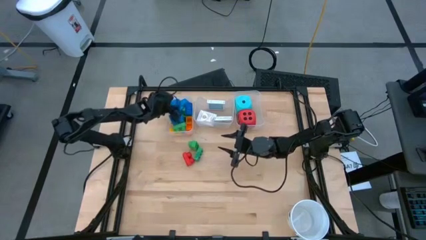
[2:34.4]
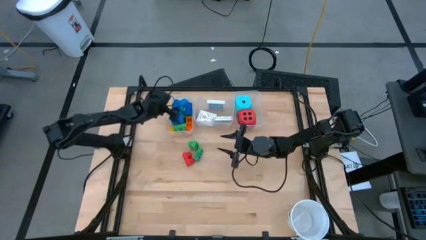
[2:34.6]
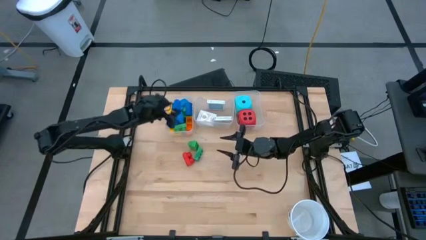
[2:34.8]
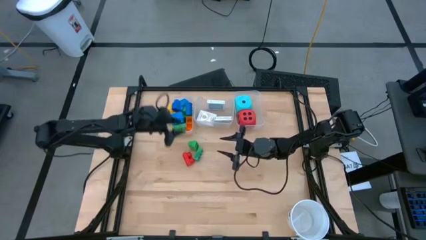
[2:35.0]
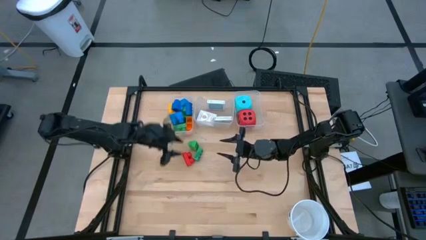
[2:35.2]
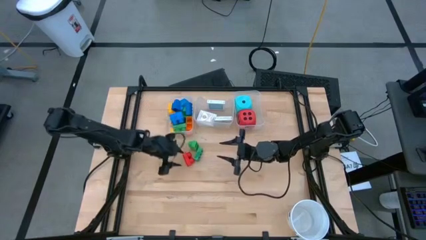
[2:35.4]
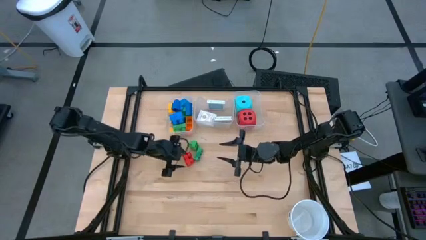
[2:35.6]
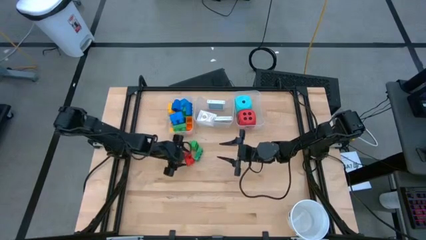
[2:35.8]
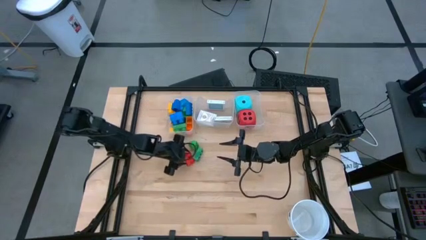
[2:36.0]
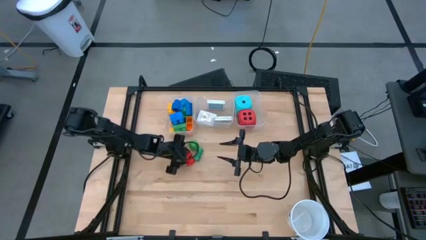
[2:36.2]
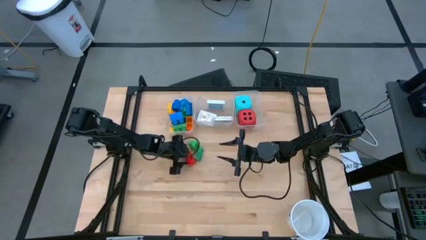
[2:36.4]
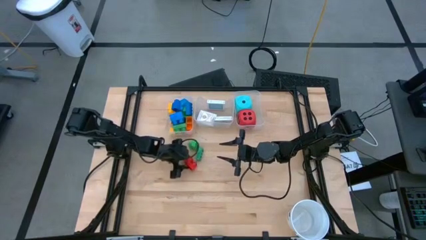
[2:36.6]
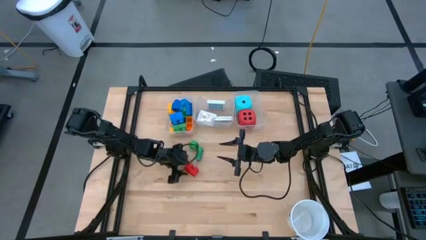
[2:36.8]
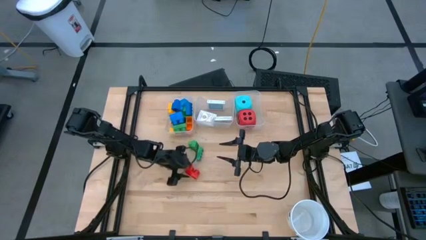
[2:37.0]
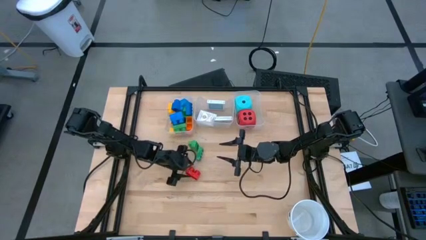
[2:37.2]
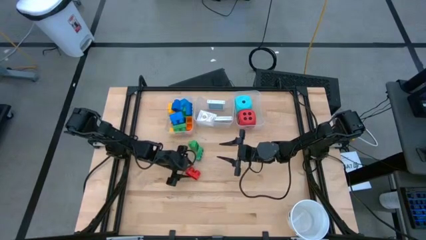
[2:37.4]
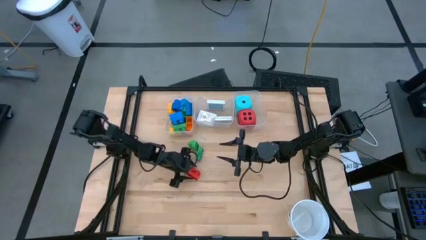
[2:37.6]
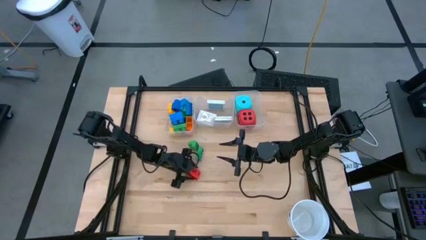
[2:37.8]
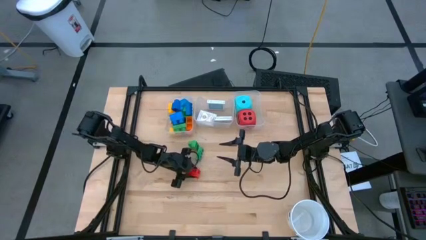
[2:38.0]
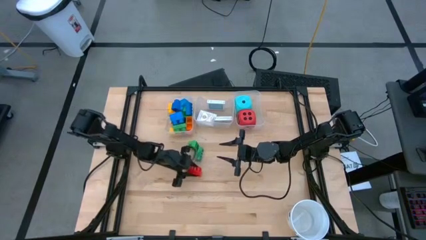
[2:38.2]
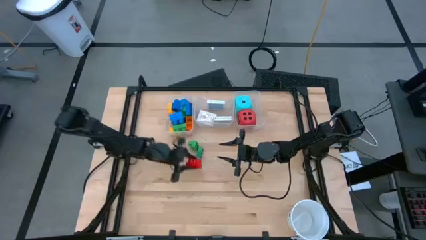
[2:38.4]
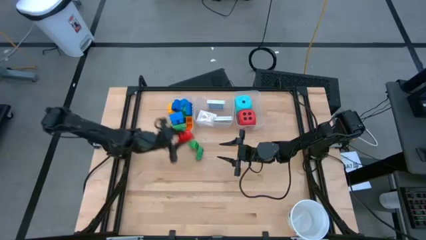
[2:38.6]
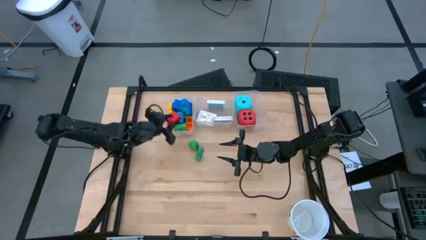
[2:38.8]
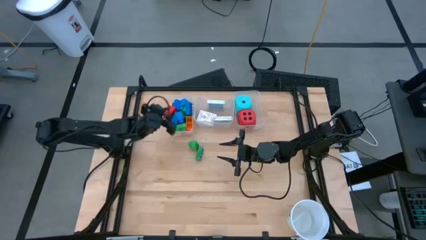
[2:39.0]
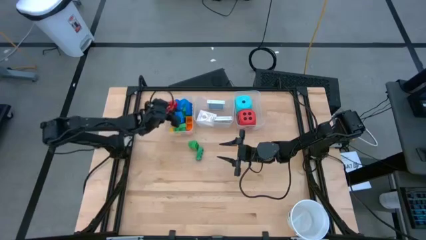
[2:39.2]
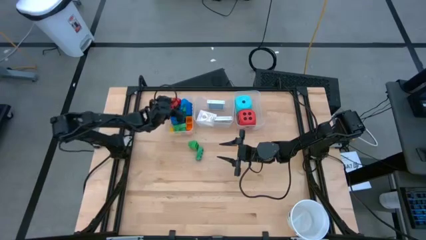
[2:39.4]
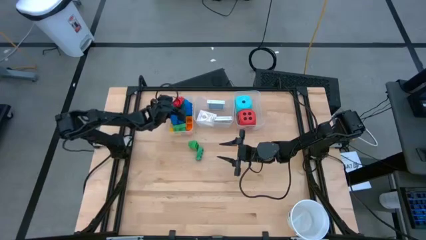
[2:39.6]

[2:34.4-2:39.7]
Task: Pick & Place Toys
Put the red game piece into the left transparent bin

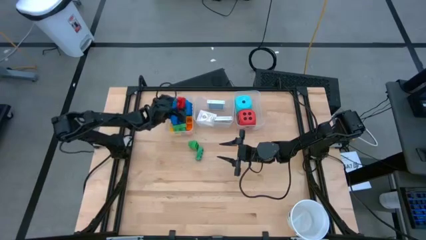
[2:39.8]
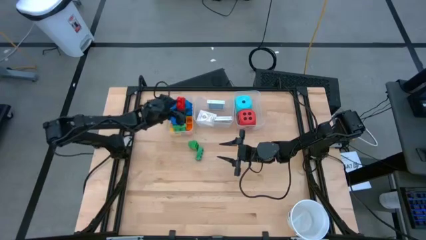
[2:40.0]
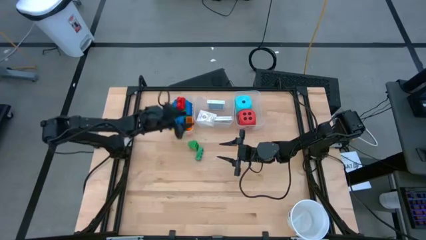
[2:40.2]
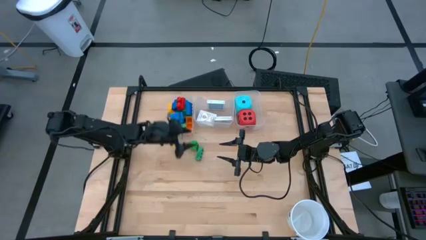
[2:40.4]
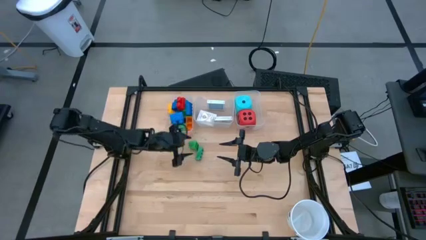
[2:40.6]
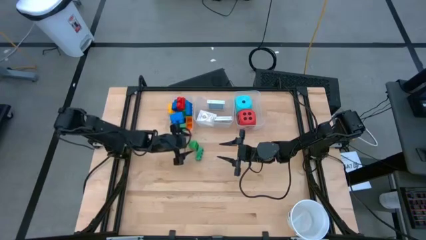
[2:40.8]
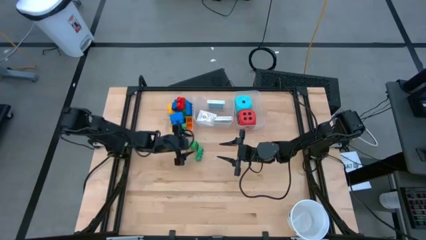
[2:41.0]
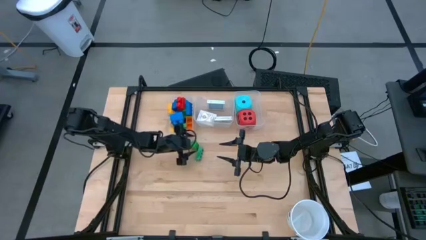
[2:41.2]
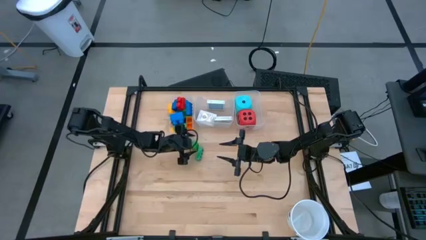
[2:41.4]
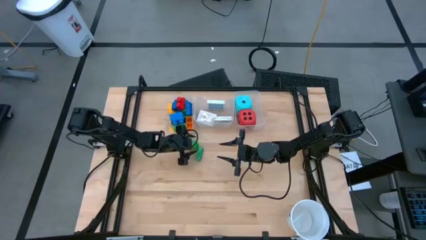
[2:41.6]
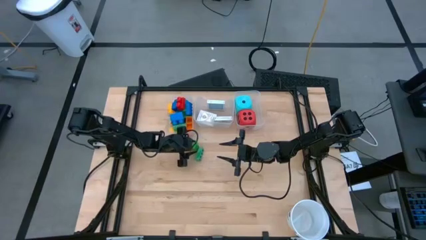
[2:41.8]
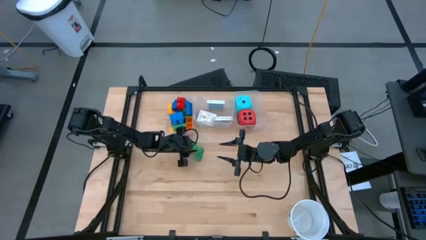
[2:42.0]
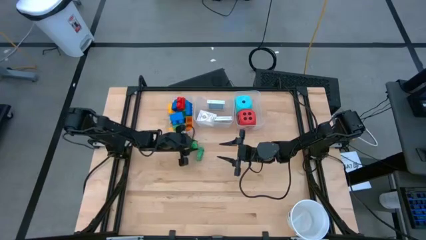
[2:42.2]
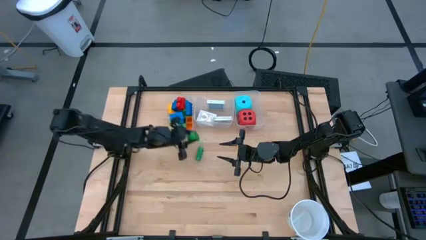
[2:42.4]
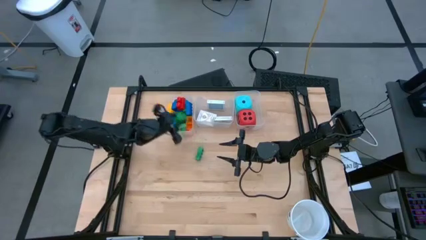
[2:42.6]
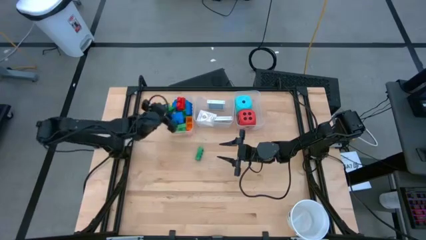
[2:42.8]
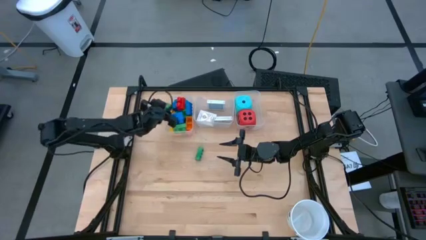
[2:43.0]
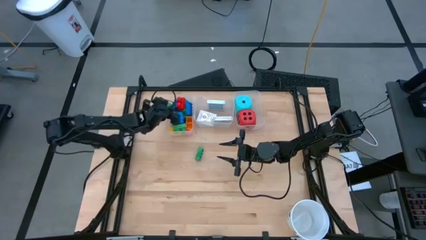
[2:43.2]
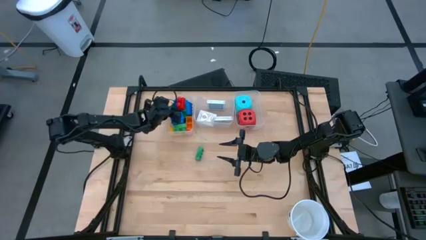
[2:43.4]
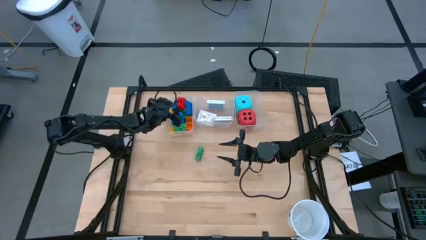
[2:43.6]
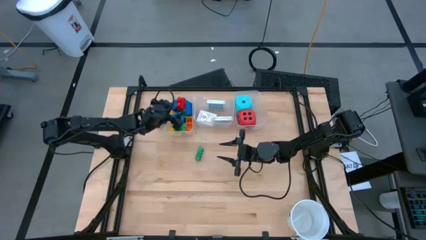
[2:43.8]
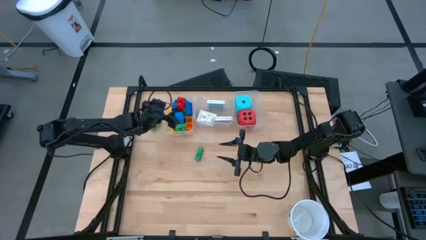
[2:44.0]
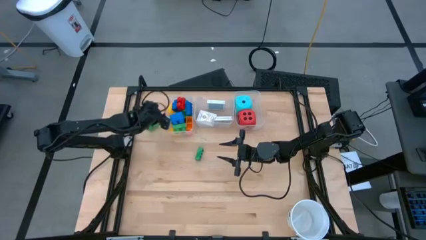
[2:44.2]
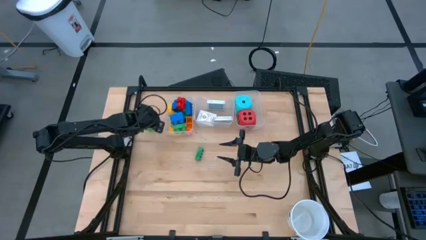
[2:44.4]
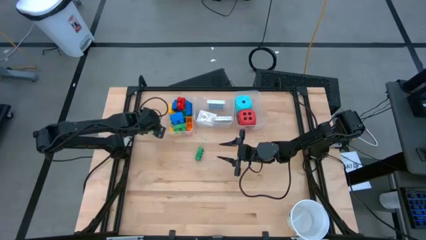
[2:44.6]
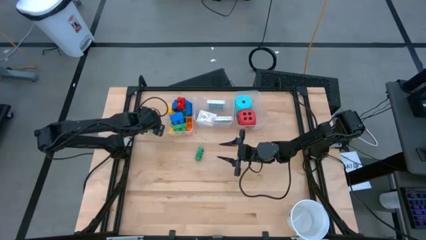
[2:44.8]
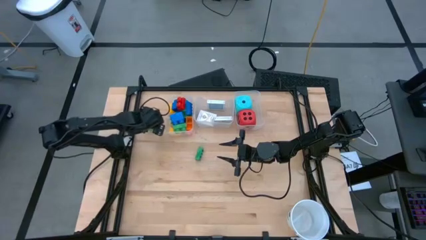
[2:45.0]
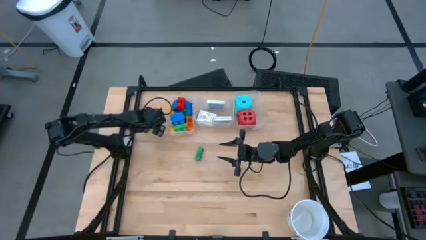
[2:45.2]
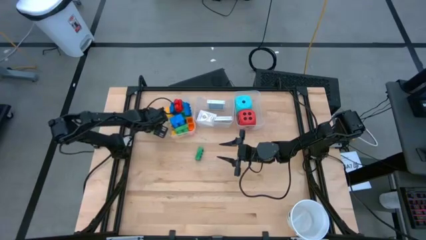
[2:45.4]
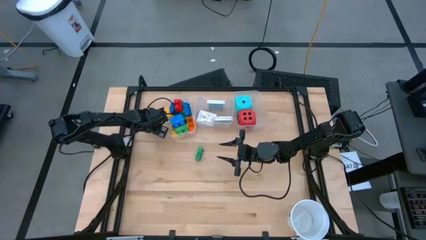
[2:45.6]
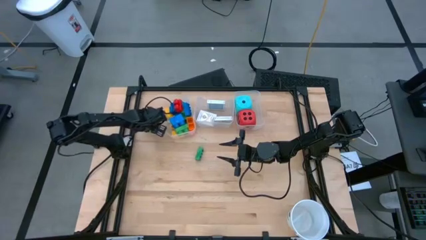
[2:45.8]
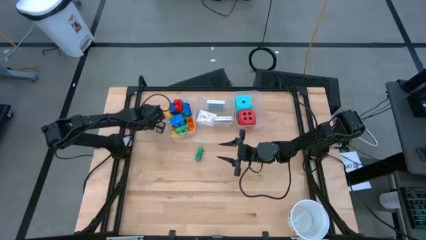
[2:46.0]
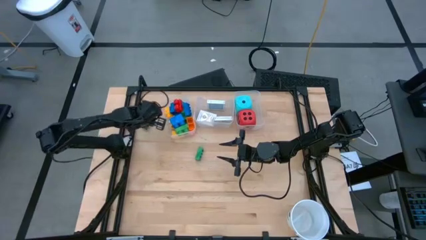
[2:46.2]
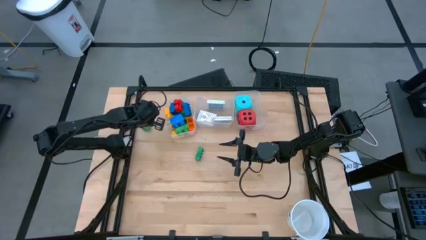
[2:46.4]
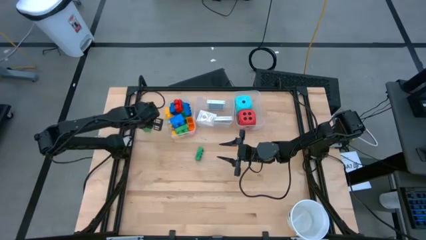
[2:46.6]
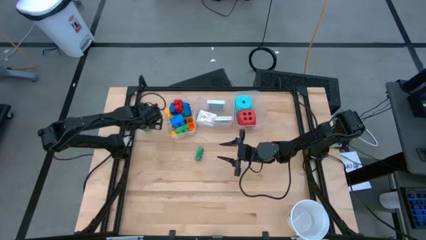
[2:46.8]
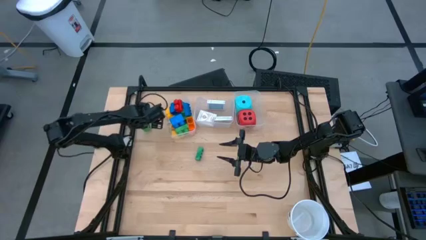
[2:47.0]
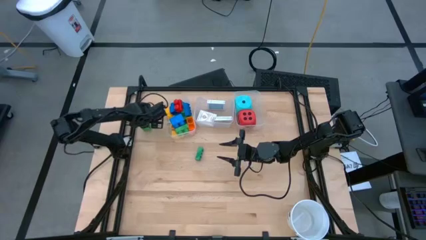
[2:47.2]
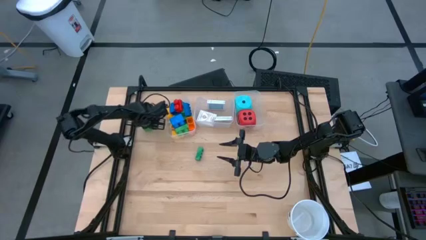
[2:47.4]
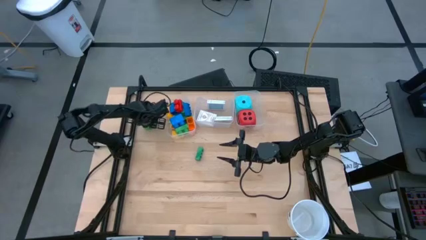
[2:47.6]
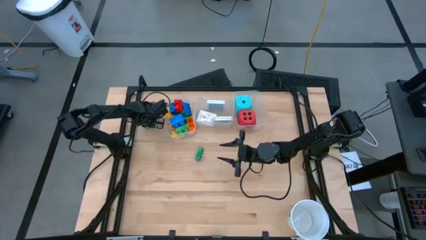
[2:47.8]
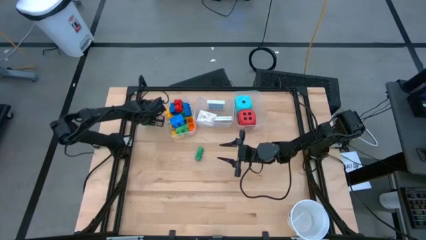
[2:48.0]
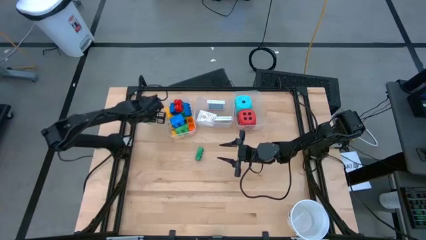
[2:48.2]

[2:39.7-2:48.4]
Put the green game piece into the left transparent bin

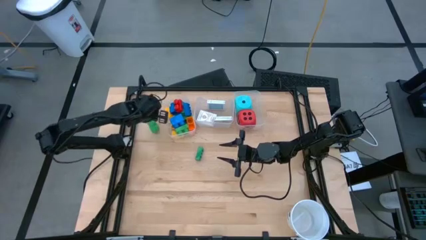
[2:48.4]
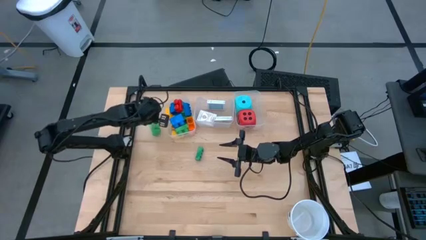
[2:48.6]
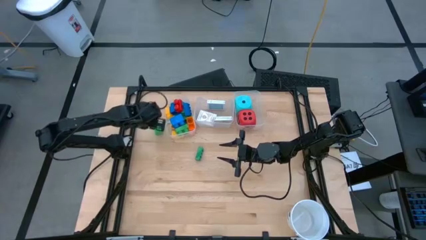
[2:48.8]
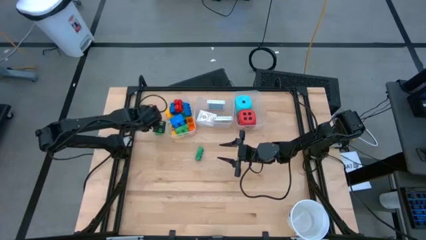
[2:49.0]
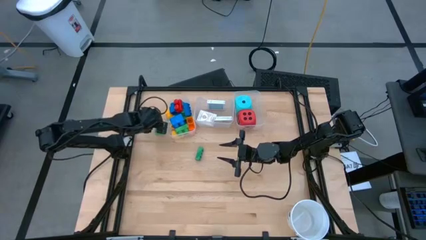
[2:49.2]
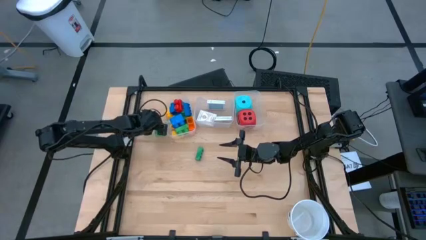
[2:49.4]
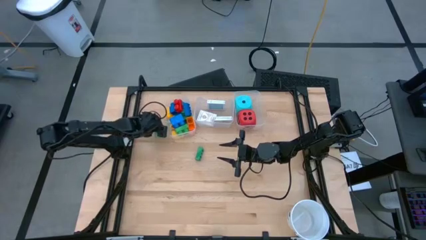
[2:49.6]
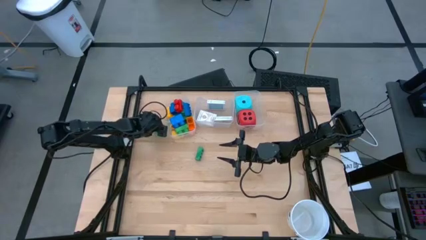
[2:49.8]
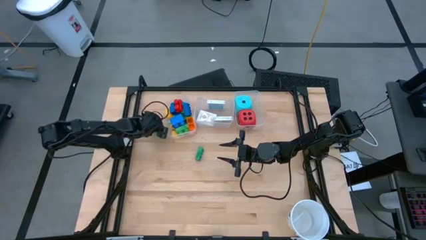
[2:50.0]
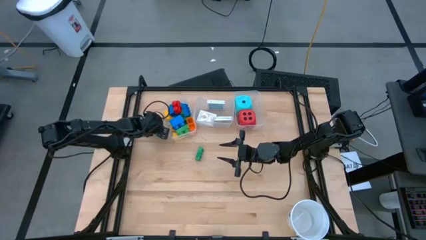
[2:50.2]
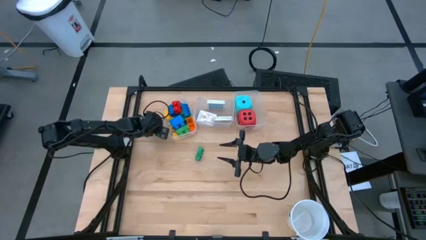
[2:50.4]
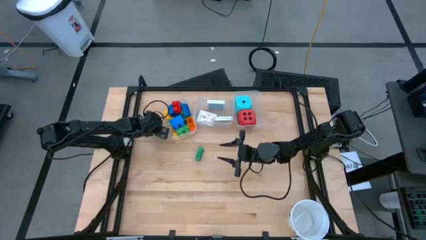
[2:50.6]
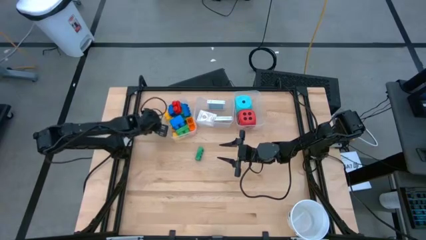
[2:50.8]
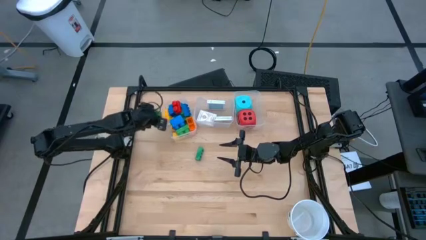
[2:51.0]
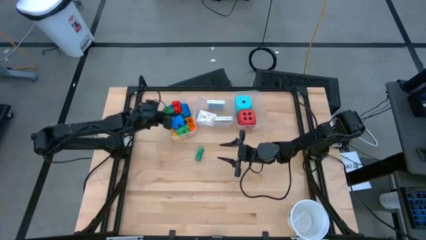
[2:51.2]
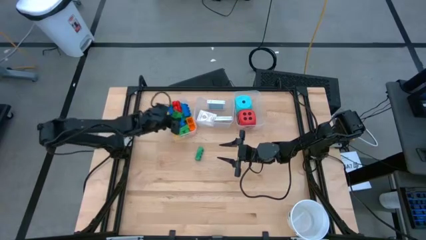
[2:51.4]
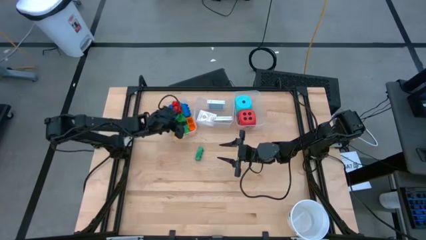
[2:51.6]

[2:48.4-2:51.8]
Put the green game piece into the left transparent bin
